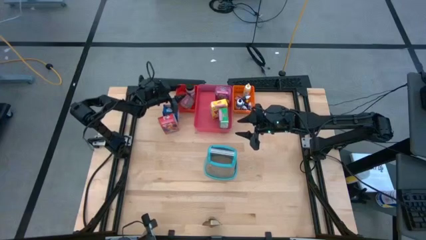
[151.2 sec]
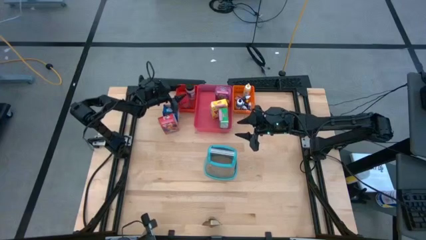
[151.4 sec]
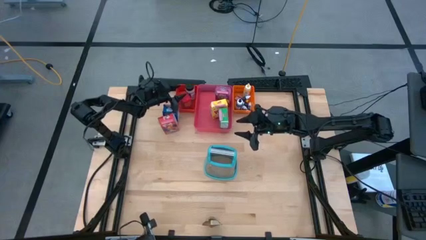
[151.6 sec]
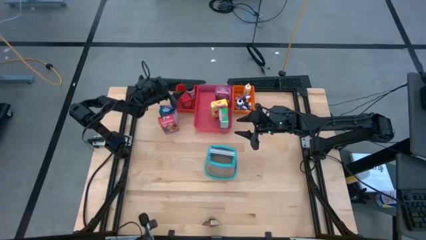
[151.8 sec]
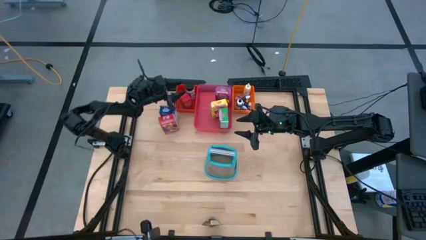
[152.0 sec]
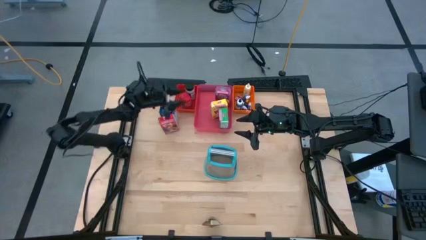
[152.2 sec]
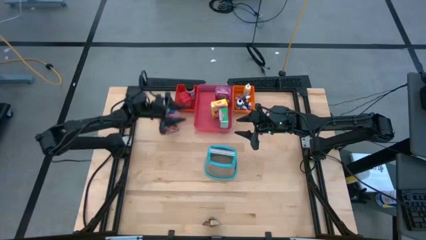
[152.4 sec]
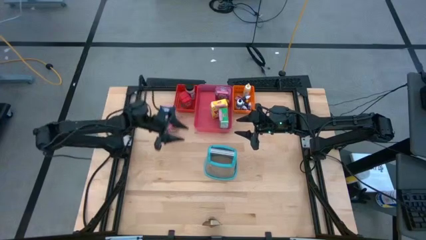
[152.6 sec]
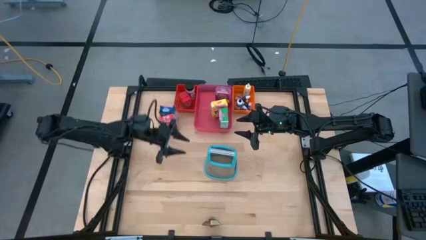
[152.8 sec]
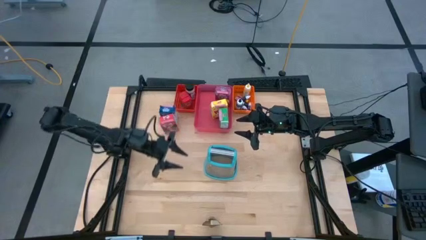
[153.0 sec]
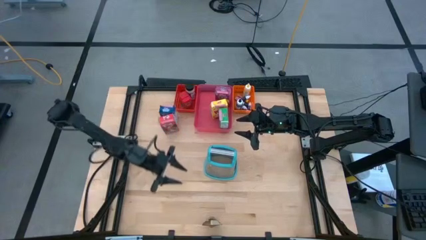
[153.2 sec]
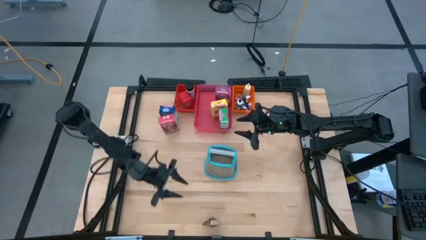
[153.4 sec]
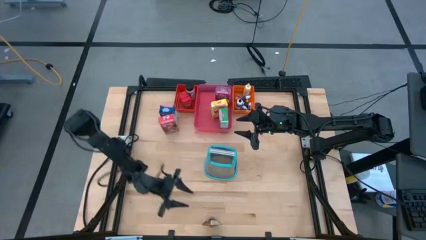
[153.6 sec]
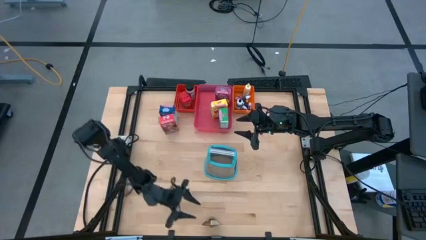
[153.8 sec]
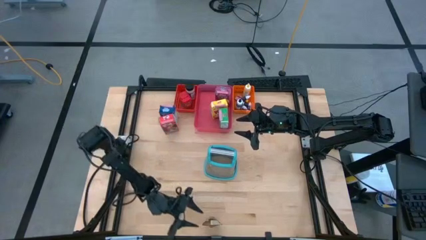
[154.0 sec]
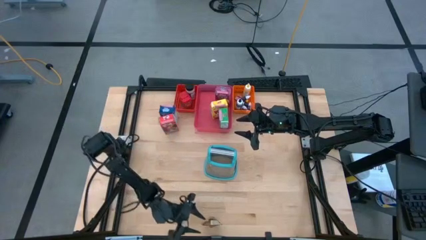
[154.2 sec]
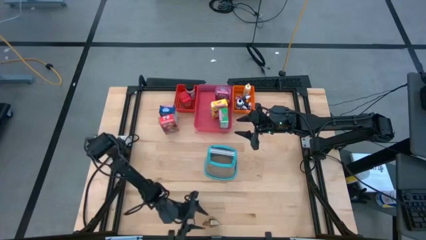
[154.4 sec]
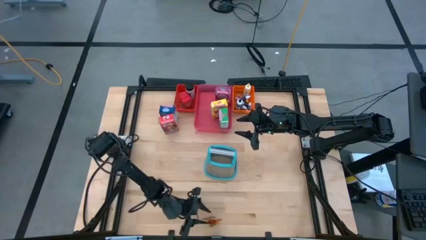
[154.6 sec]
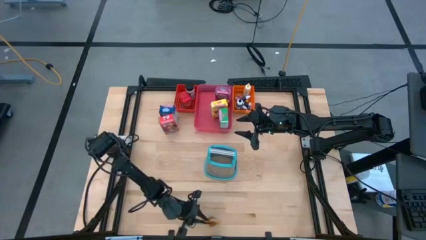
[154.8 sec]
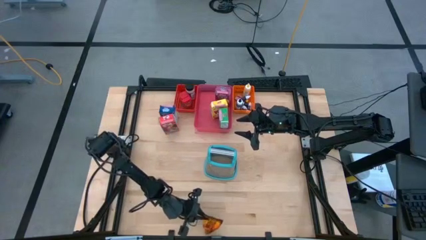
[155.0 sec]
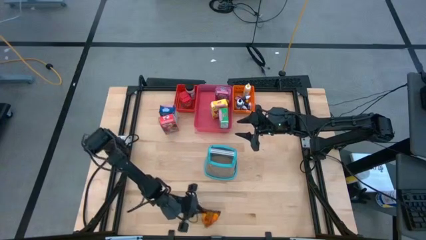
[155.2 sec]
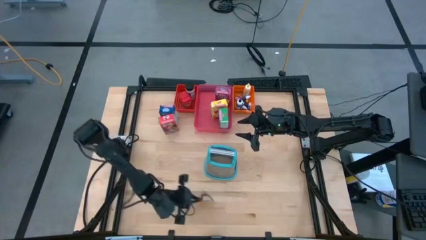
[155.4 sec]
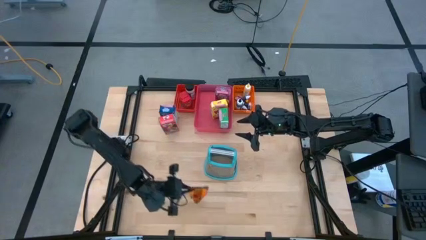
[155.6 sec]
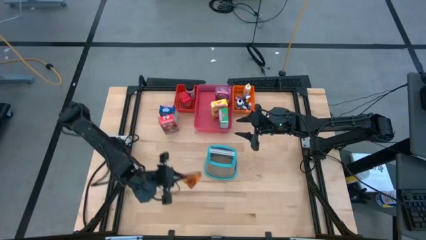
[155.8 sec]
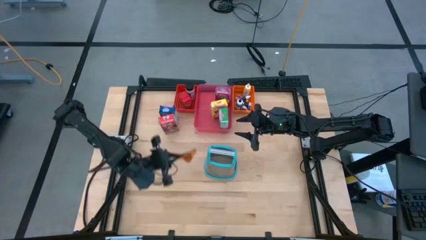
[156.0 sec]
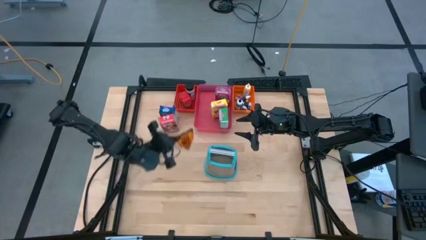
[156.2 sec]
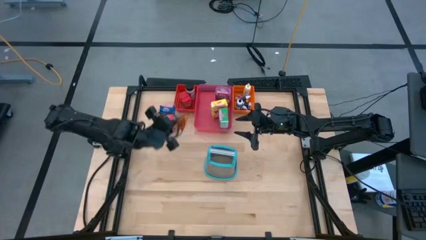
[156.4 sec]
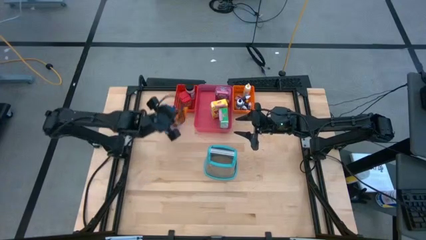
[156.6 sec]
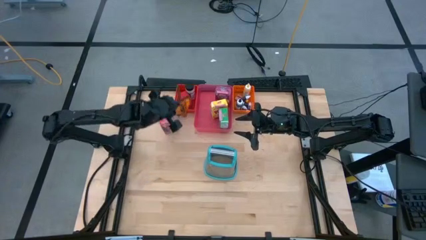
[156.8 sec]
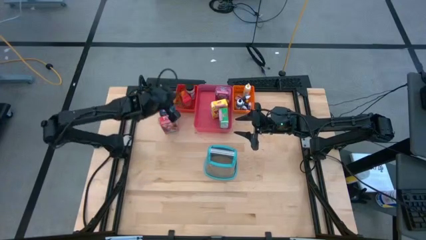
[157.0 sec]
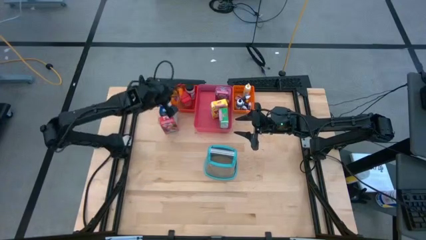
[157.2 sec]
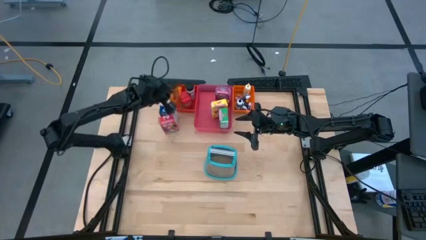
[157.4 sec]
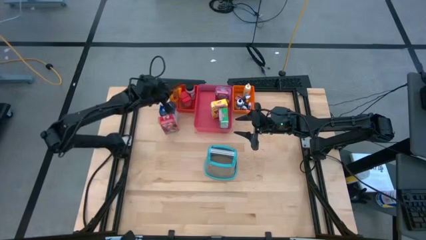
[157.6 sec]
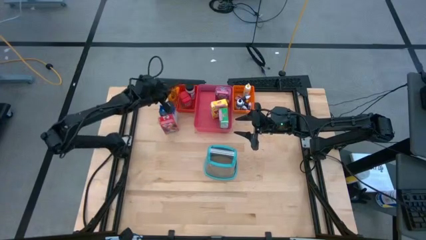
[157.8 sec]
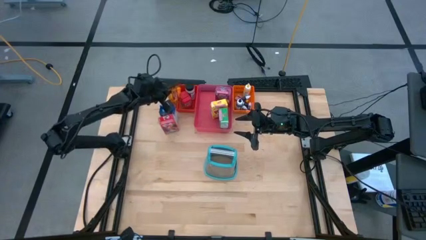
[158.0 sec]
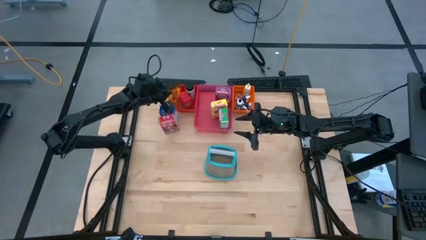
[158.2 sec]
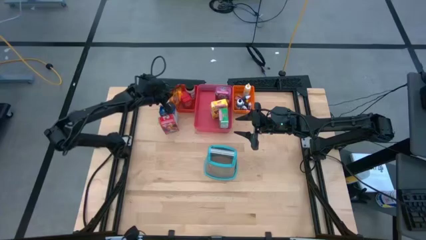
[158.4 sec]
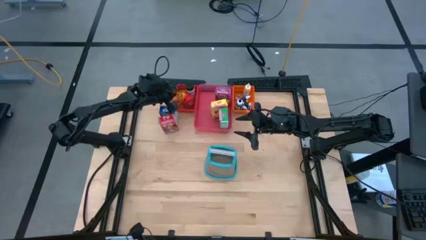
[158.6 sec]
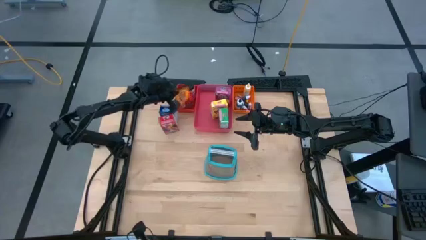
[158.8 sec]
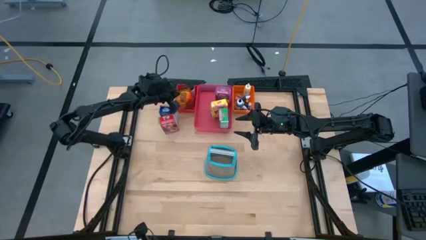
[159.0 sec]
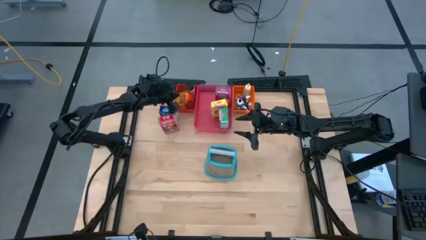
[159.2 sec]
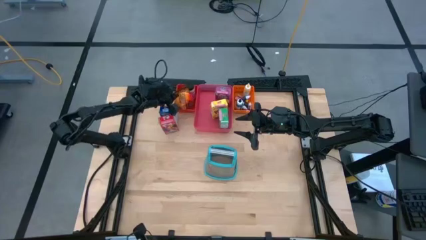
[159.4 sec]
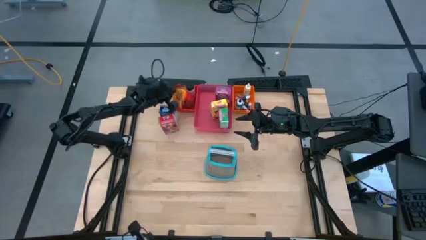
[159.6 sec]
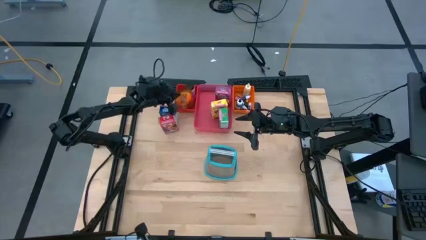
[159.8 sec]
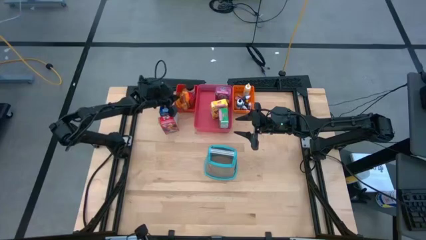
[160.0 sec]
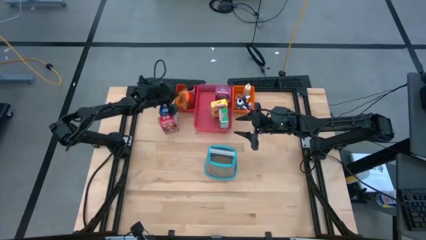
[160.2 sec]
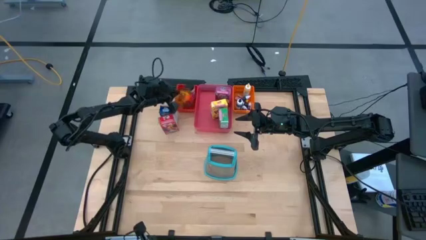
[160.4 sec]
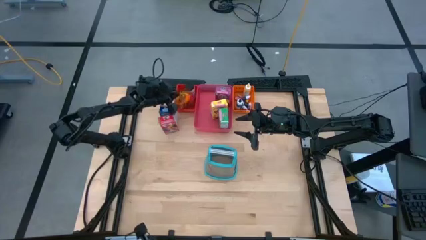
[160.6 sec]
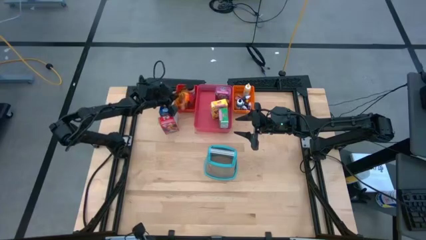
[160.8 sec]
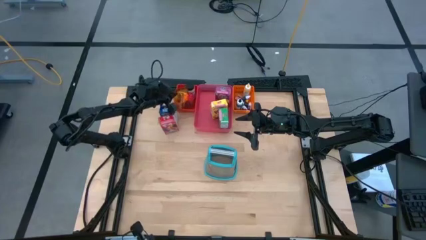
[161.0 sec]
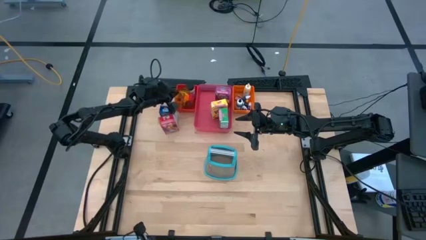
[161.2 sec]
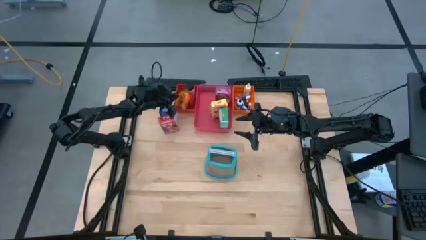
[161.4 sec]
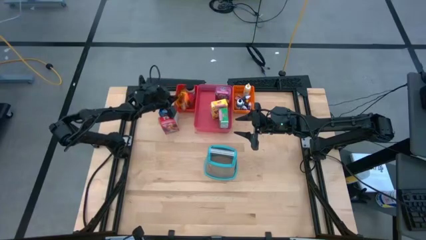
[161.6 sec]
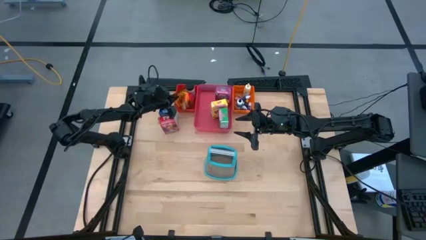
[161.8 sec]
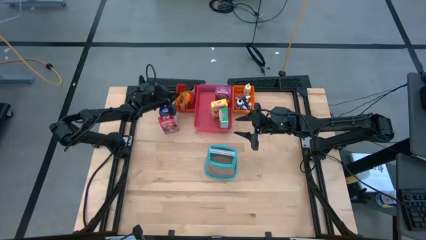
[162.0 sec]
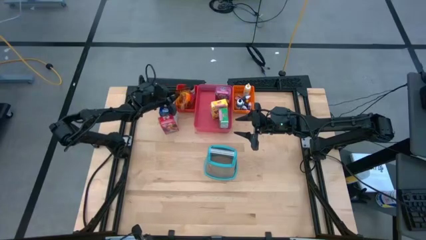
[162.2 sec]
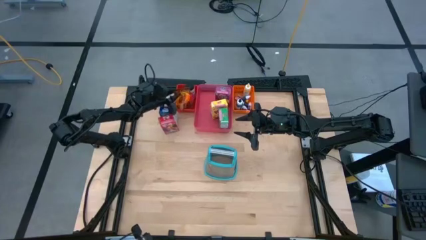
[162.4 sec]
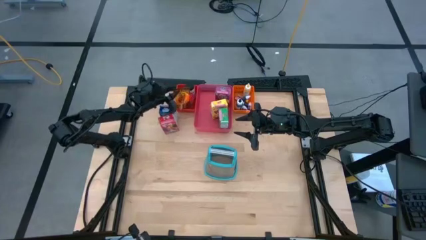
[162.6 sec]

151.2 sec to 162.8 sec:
Task: Pick & Place Kitchen Items
Put the orange seasoning bag into the red bin

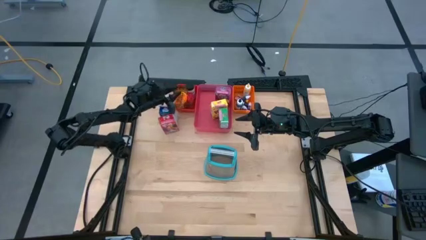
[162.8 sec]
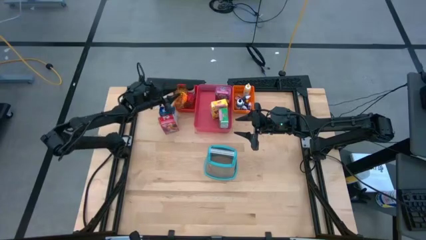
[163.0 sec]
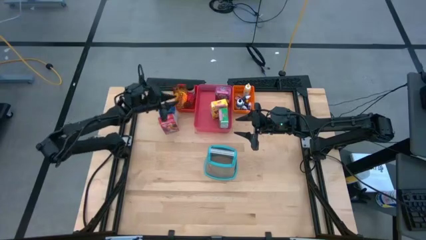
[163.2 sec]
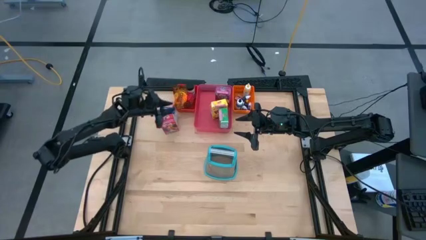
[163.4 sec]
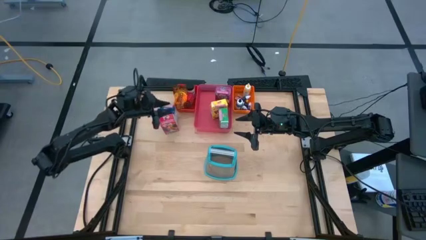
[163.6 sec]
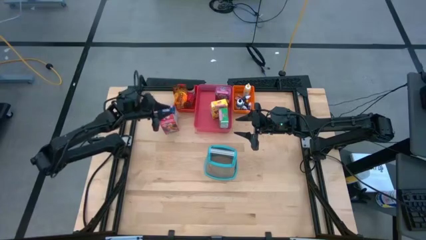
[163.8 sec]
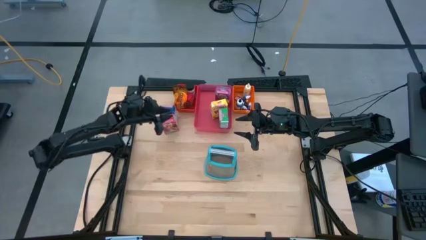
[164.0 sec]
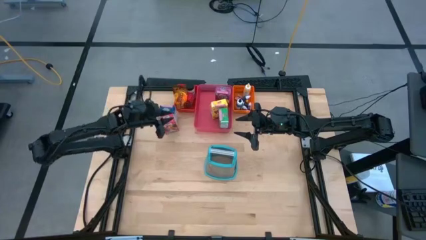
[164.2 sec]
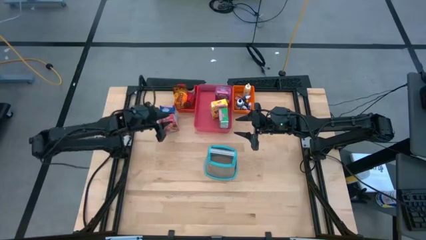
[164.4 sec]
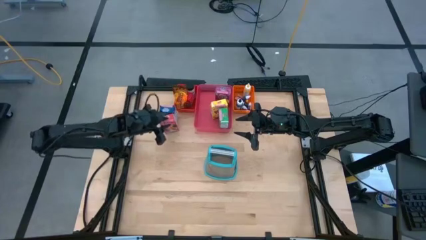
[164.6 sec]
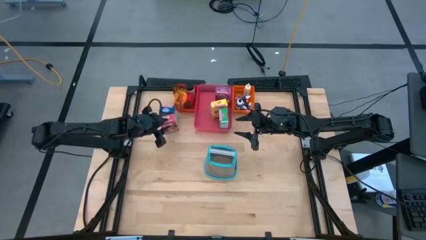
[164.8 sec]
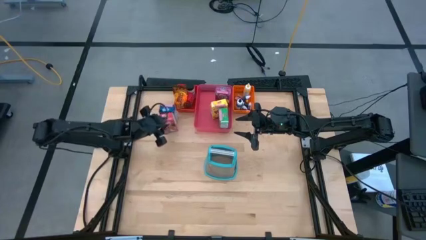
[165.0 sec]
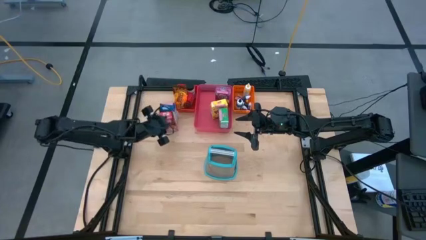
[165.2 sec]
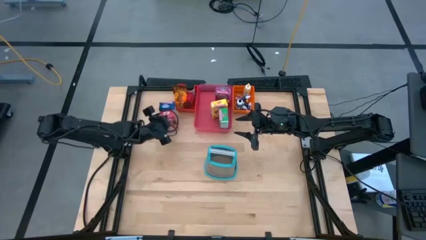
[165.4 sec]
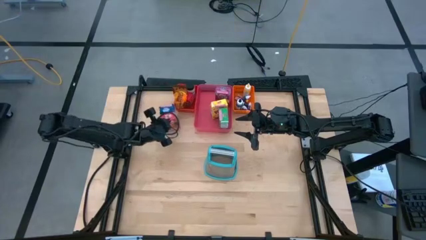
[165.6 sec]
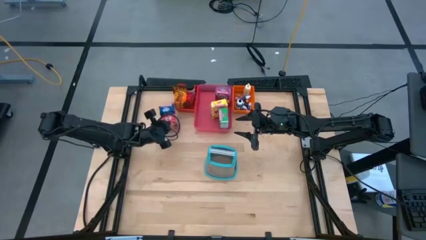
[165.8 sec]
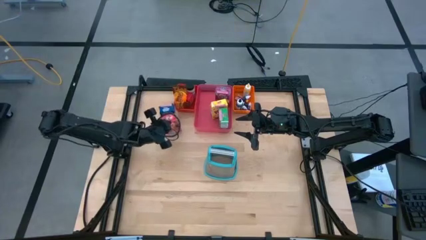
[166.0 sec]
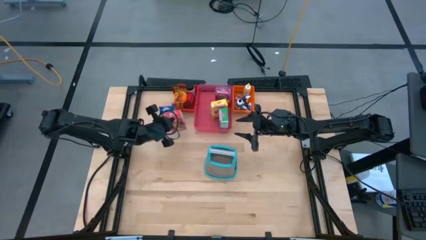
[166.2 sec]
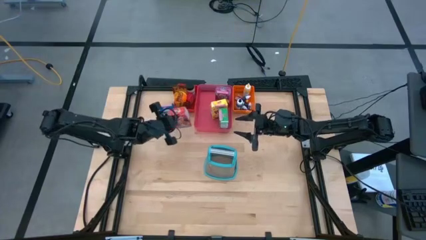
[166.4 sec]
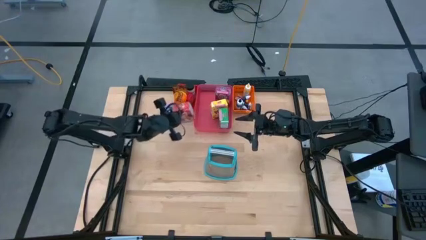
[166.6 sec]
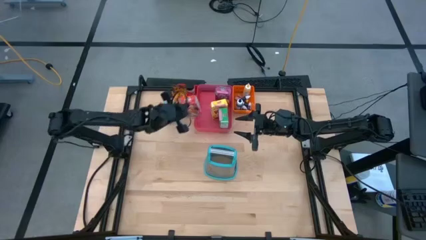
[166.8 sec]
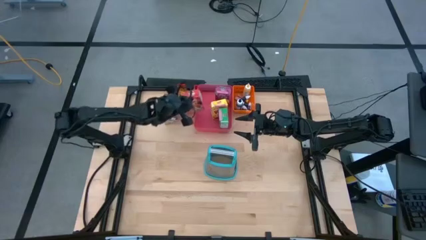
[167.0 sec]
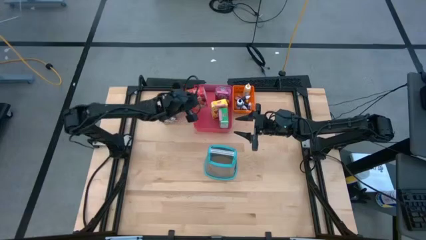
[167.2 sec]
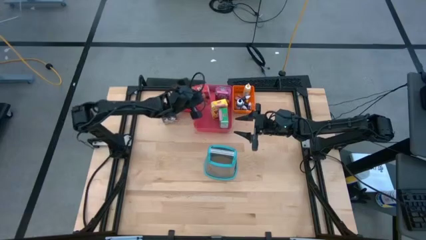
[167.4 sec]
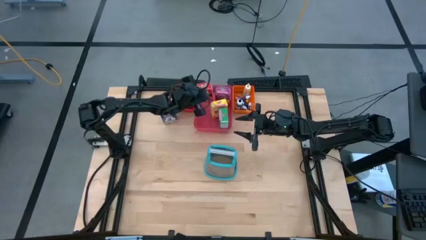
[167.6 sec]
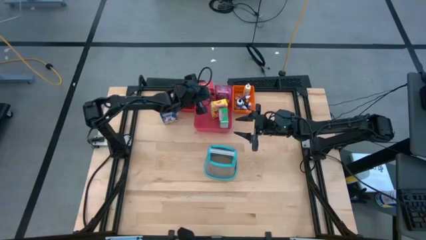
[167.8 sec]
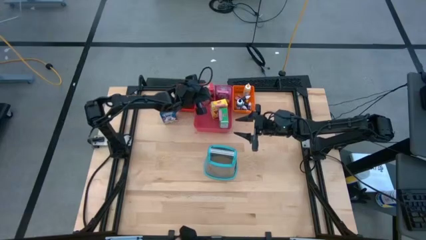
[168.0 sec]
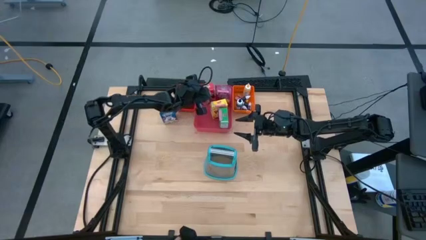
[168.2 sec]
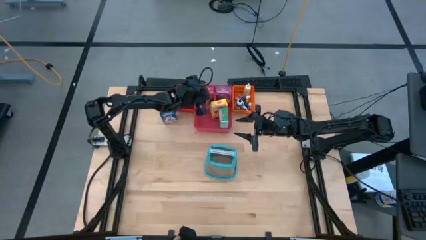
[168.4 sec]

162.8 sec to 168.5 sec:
Put the red cereal box into the pink bin
